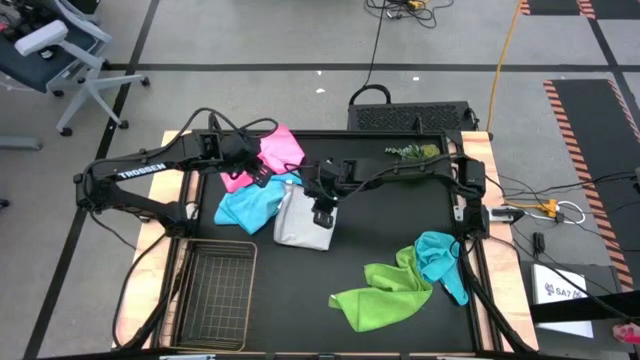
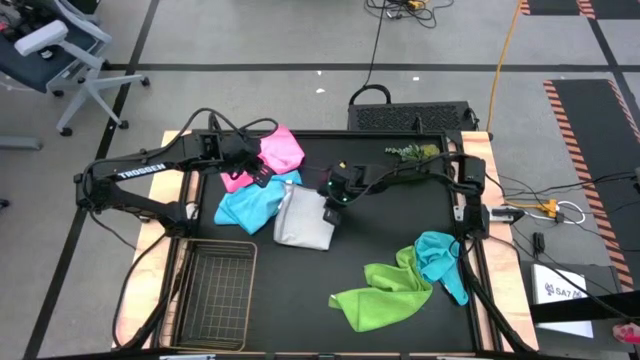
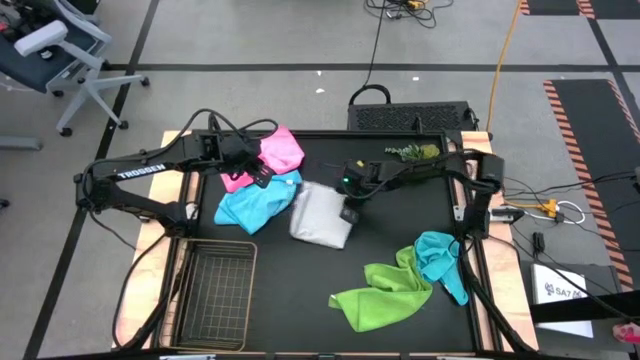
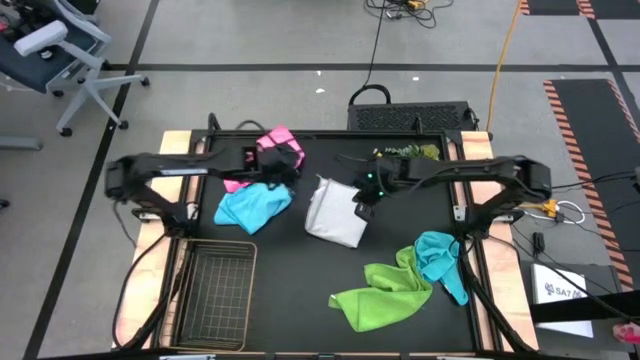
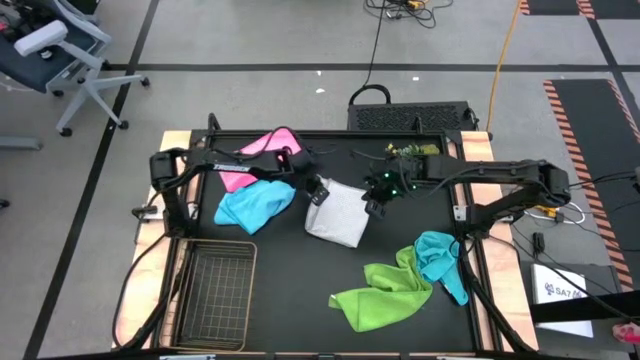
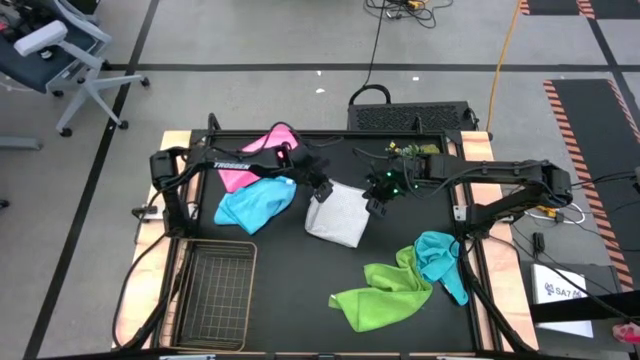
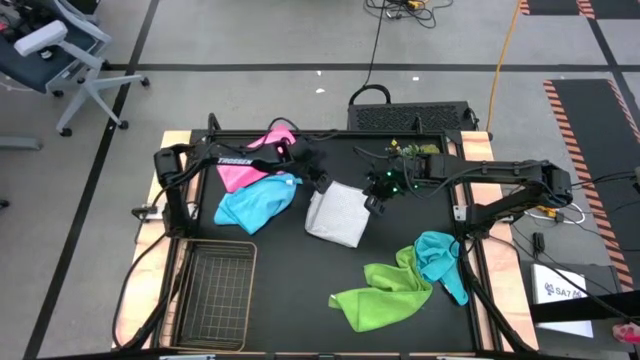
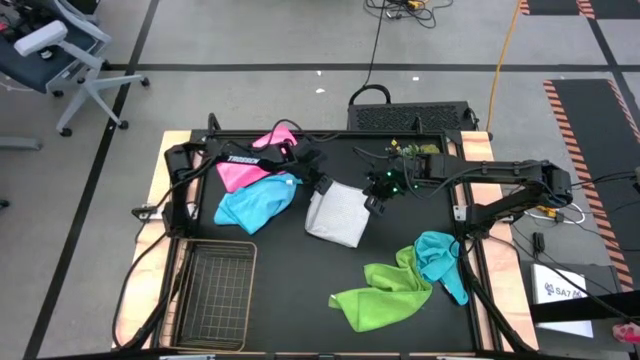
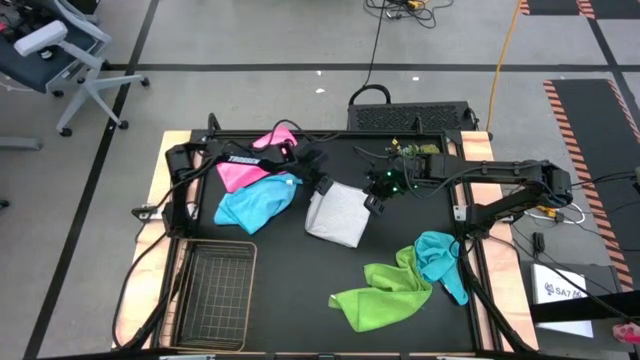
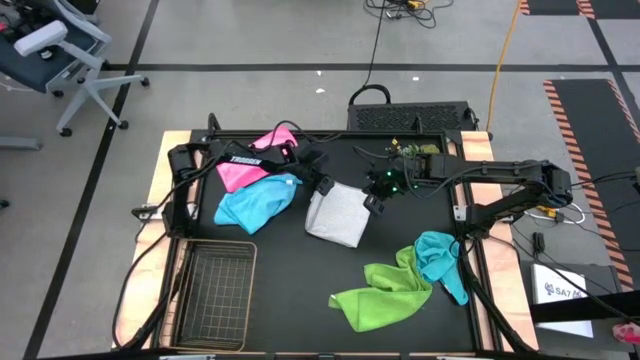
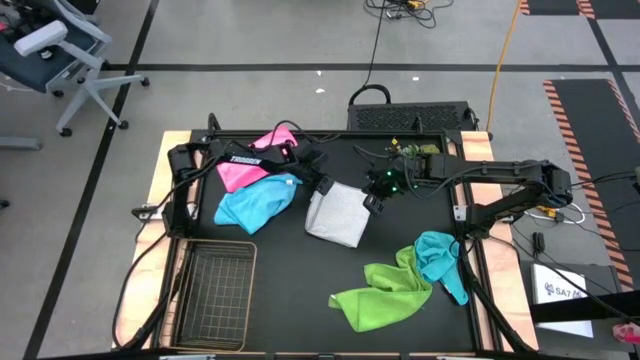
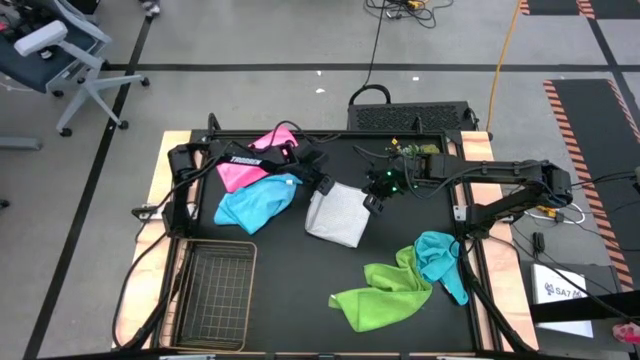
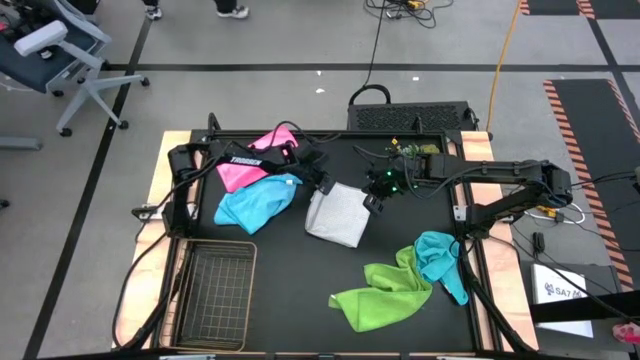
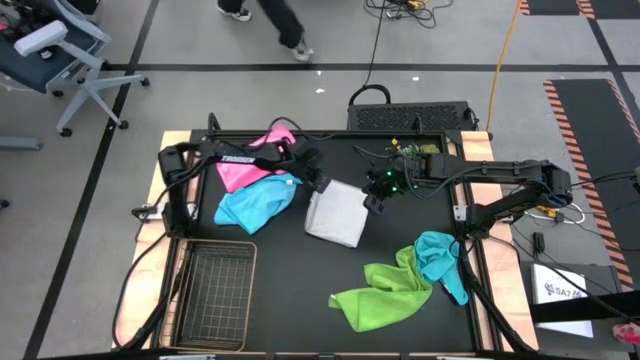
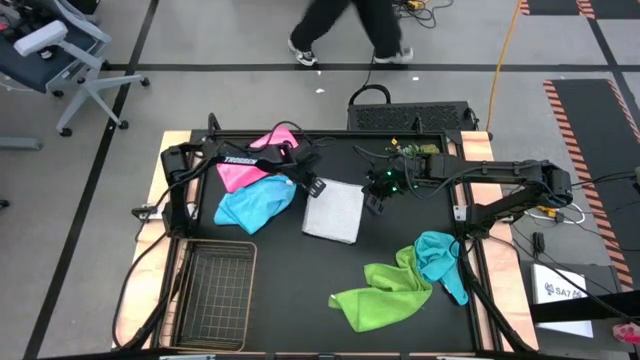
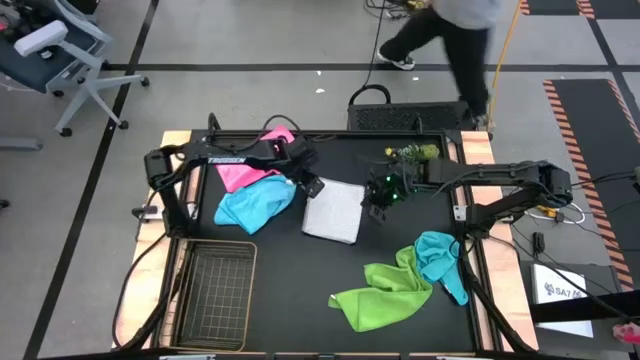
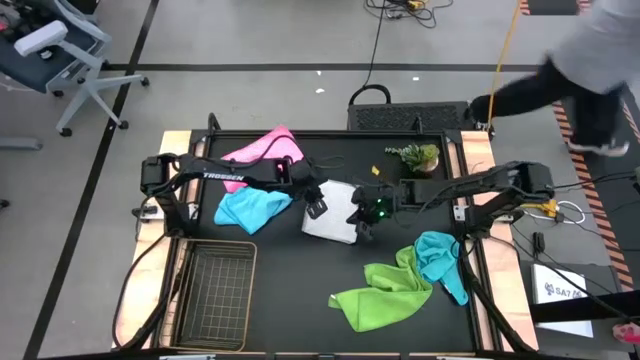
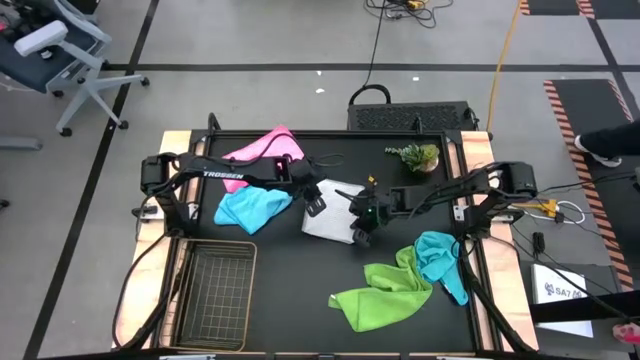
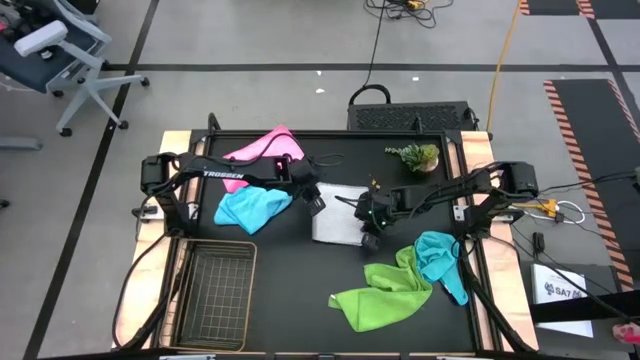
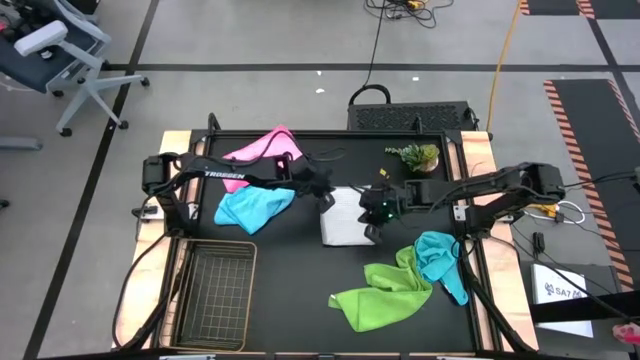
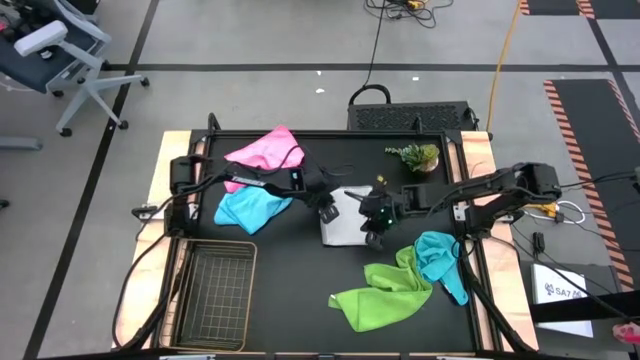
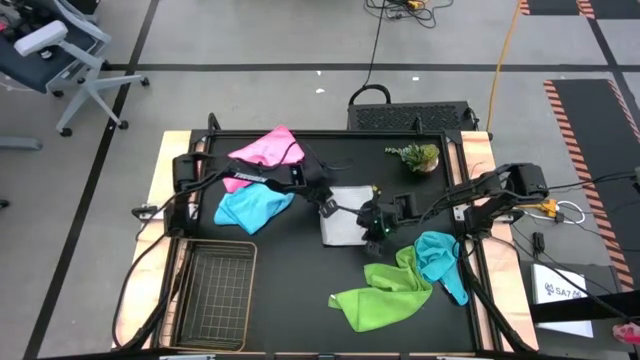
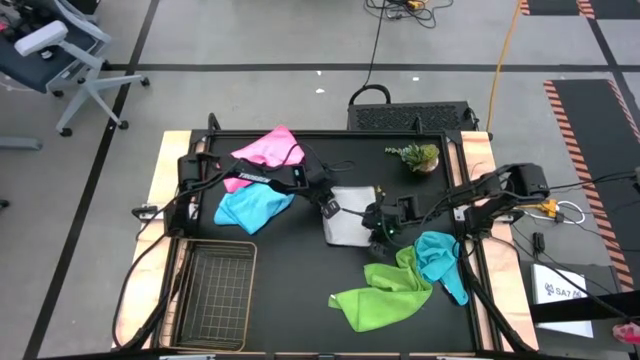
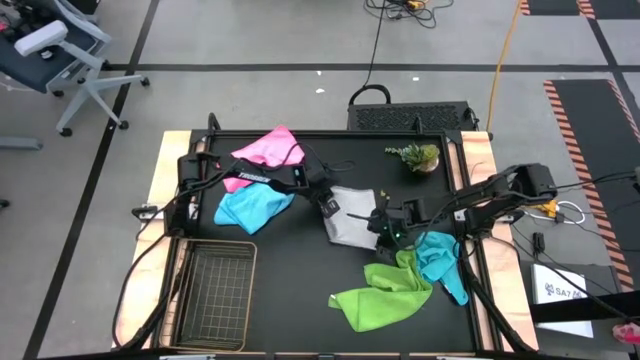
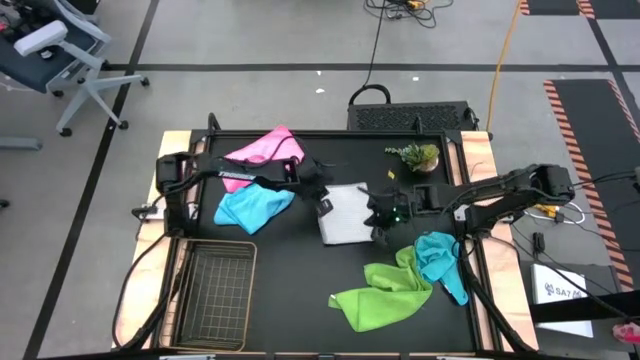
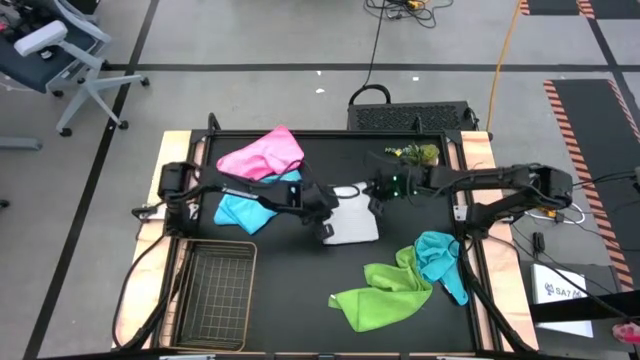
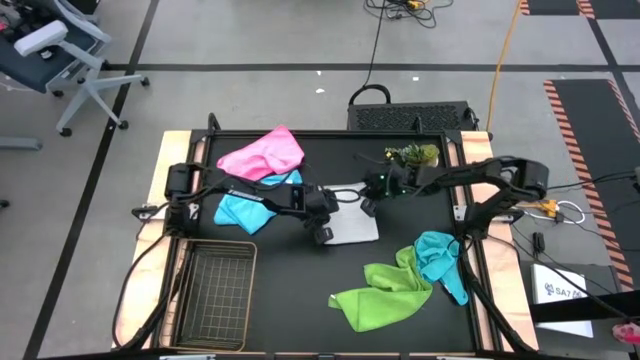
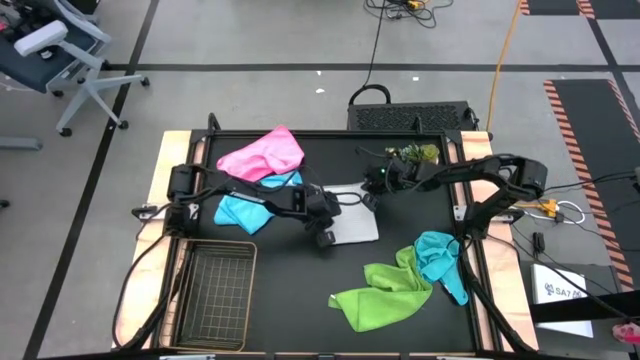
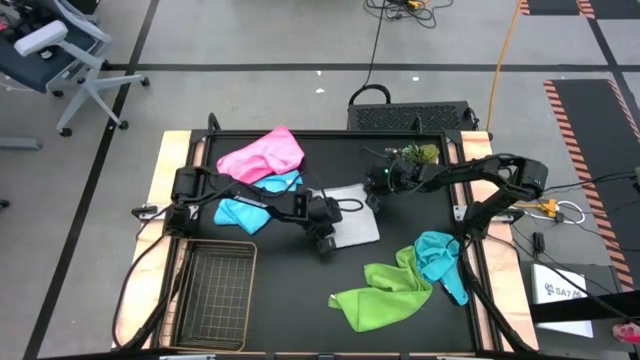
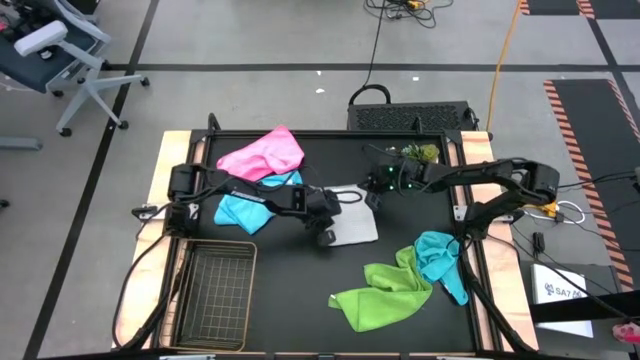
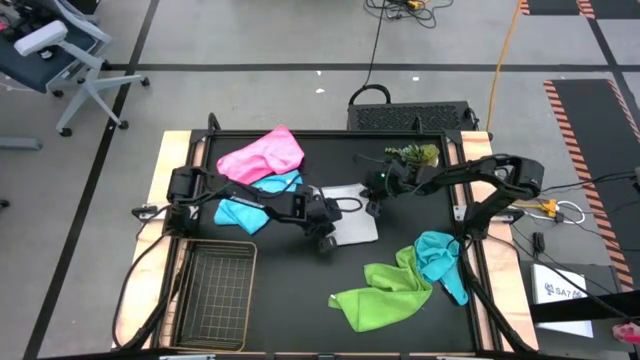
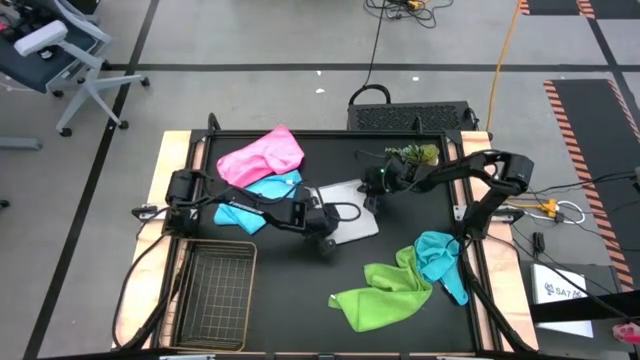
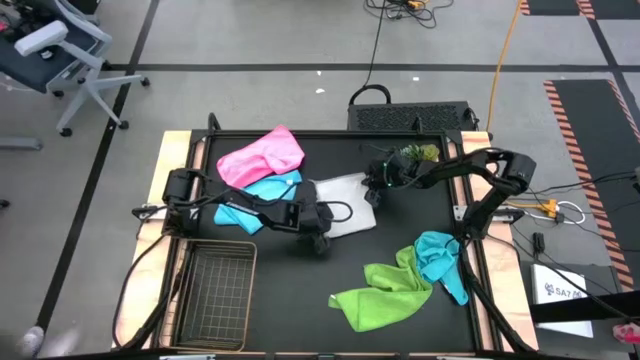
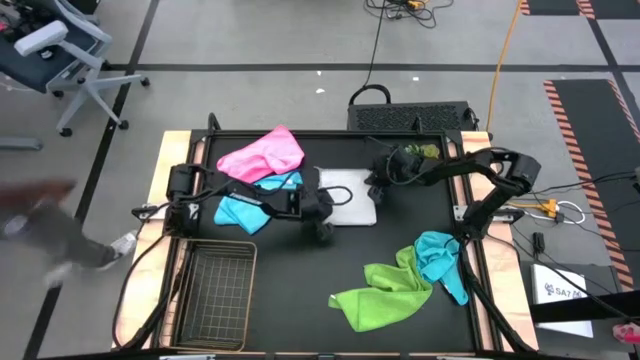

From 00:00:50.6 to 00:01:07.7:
Task: Fold microfiber towels
Fold the gray microfiber cloth

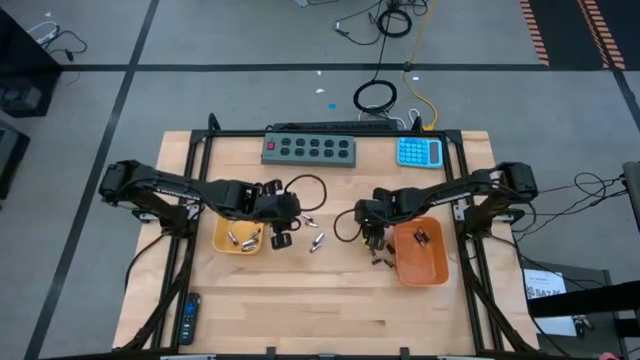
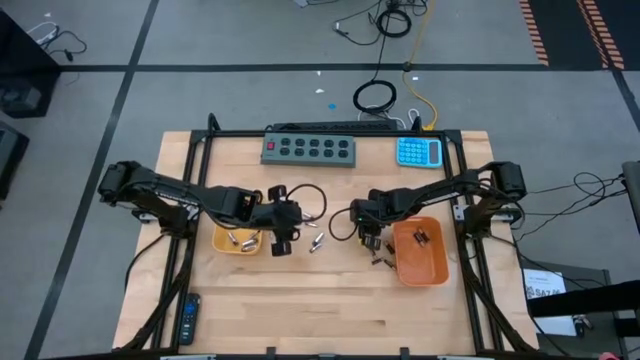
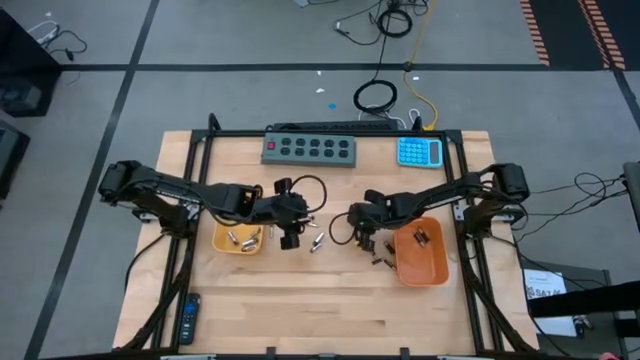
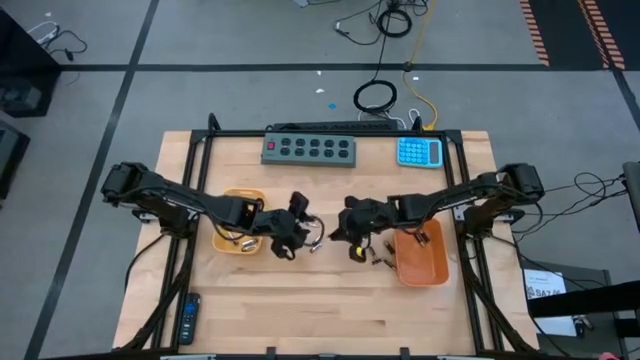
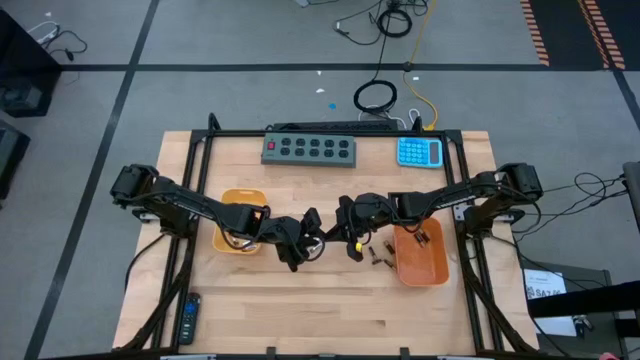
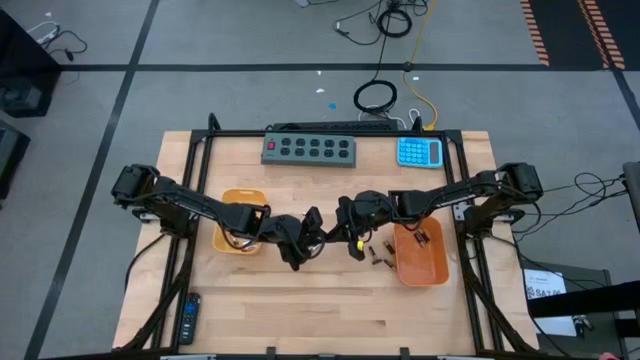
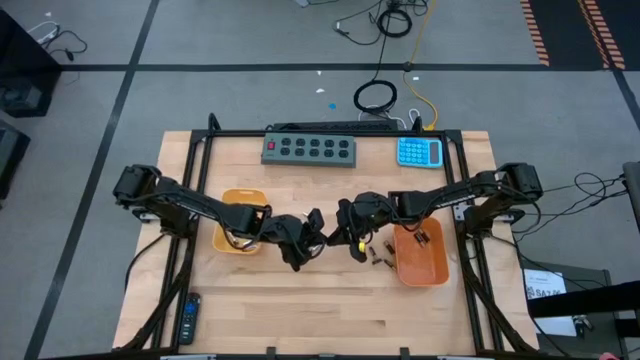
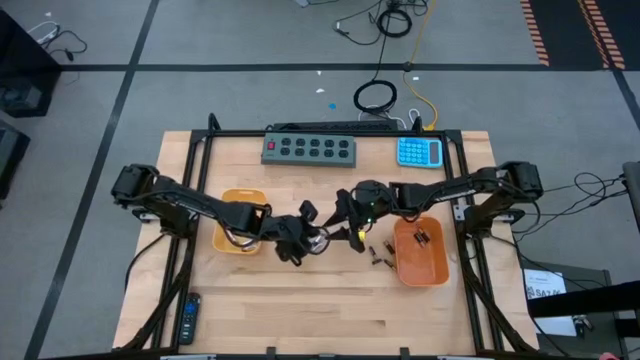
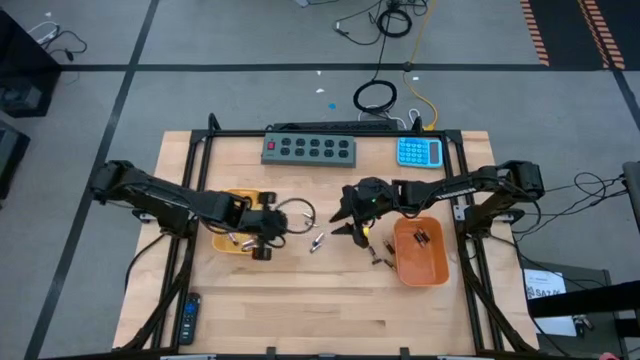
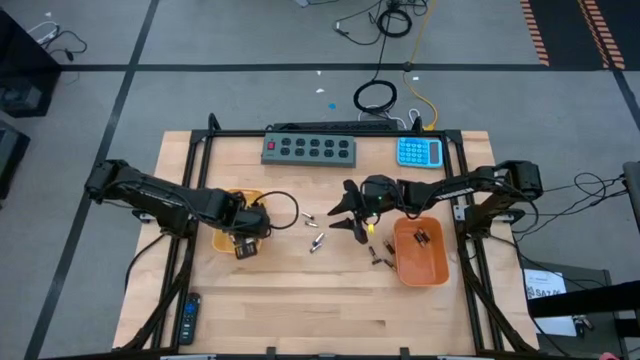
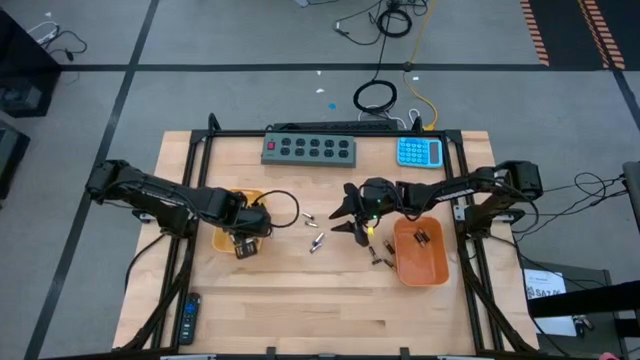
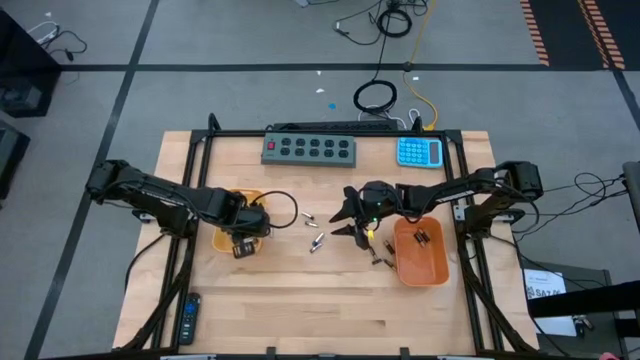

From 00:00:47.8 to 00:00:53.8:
Task: Sort batteries
Put the silver battery into the yellow bin
